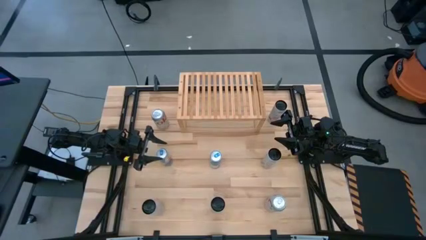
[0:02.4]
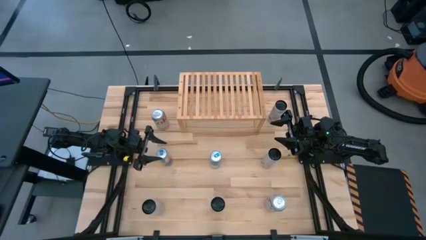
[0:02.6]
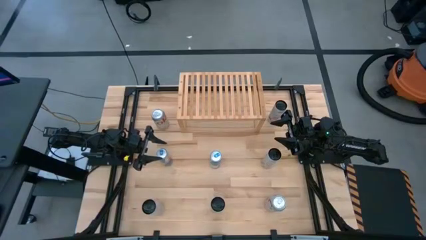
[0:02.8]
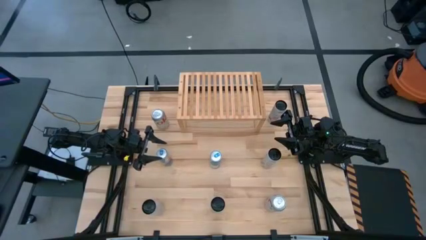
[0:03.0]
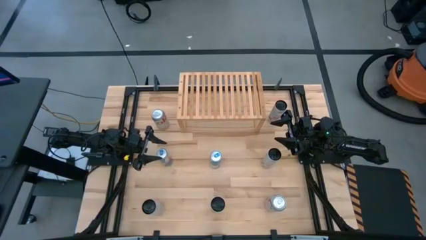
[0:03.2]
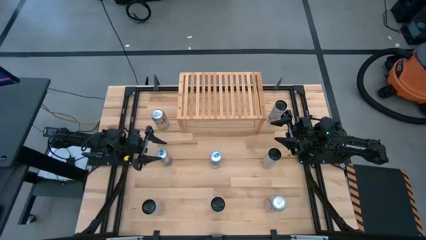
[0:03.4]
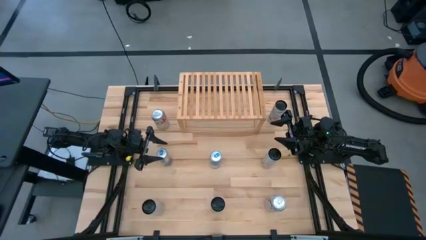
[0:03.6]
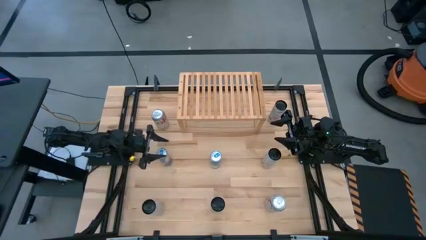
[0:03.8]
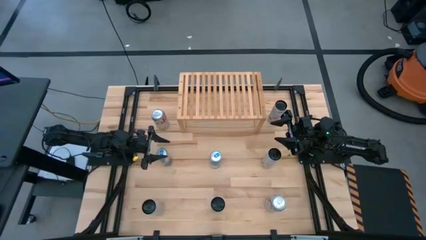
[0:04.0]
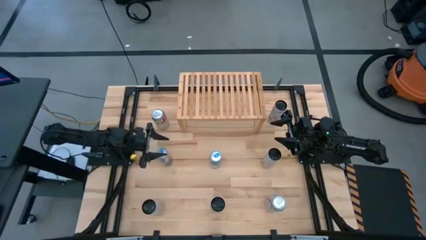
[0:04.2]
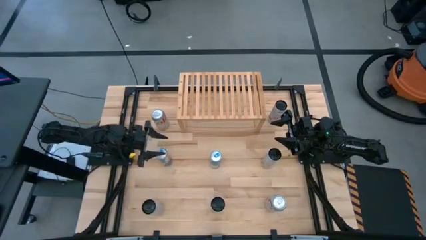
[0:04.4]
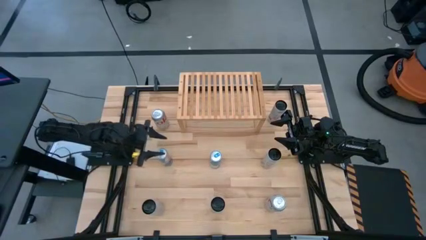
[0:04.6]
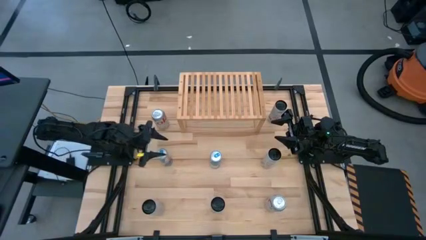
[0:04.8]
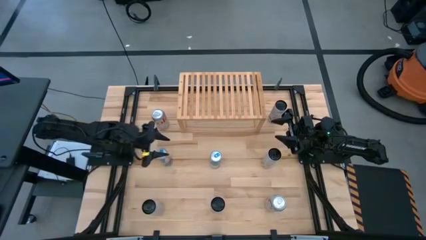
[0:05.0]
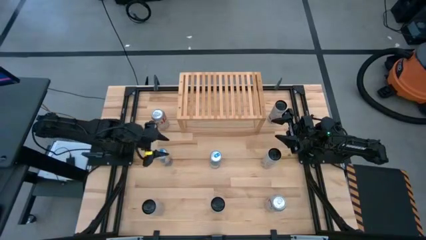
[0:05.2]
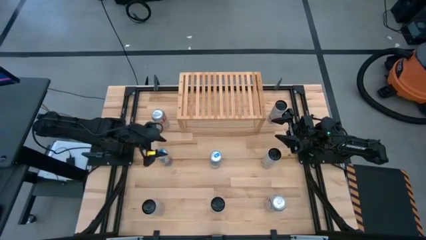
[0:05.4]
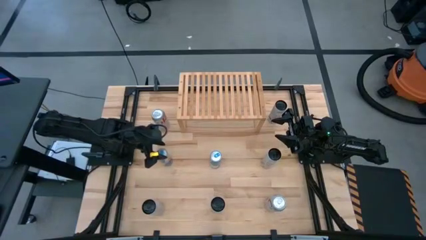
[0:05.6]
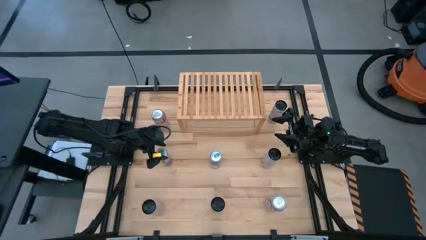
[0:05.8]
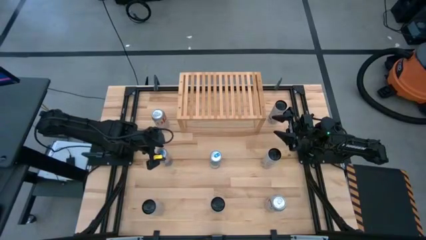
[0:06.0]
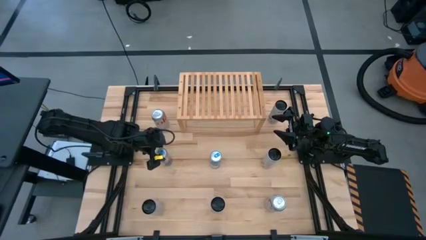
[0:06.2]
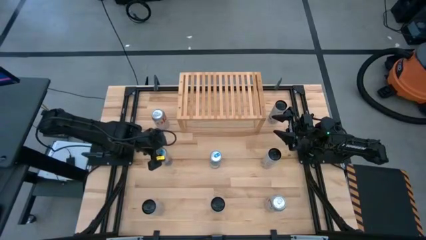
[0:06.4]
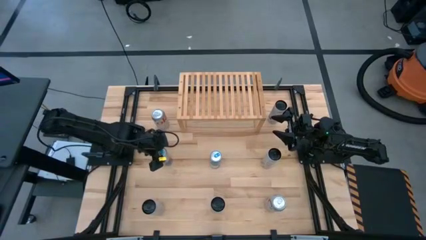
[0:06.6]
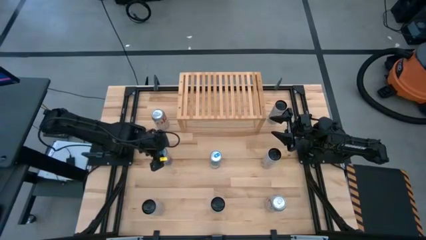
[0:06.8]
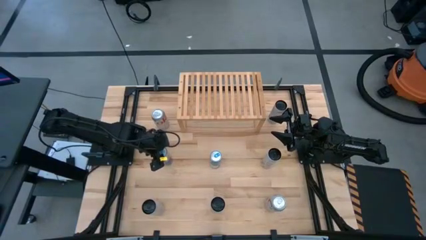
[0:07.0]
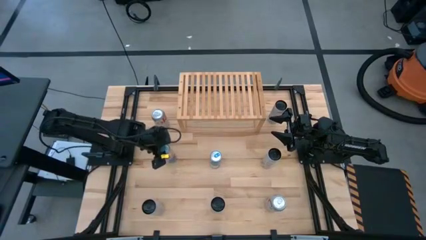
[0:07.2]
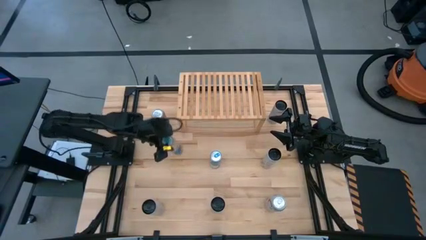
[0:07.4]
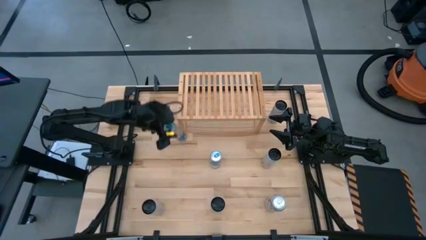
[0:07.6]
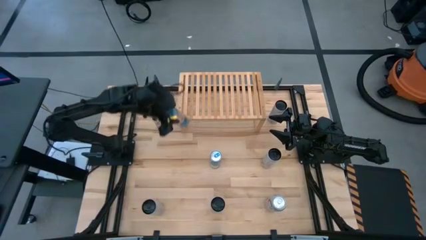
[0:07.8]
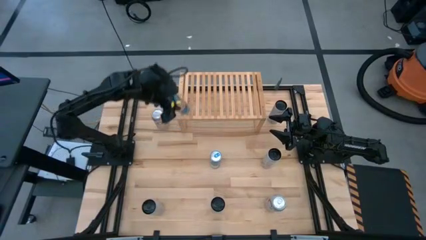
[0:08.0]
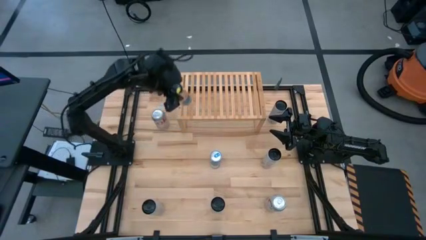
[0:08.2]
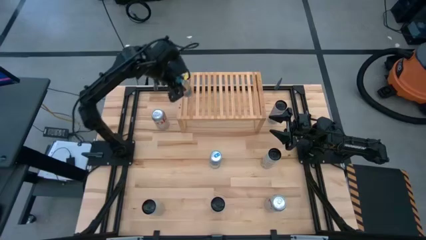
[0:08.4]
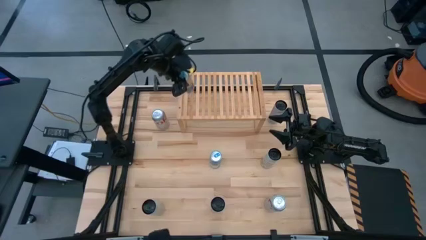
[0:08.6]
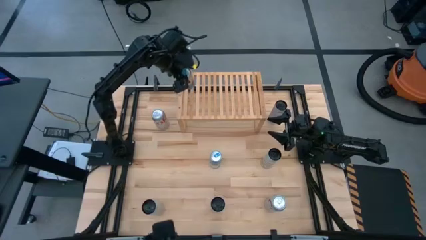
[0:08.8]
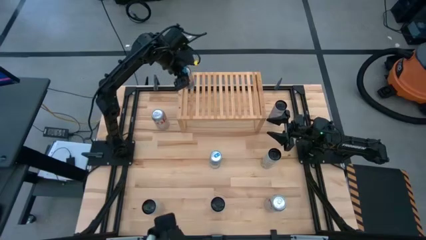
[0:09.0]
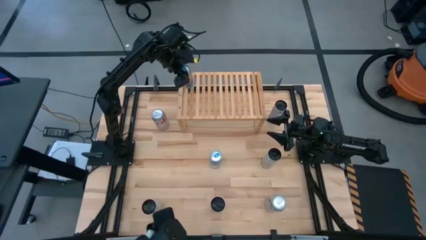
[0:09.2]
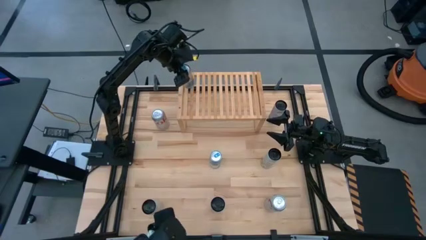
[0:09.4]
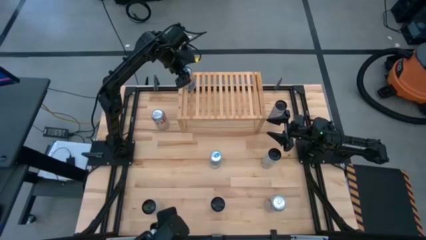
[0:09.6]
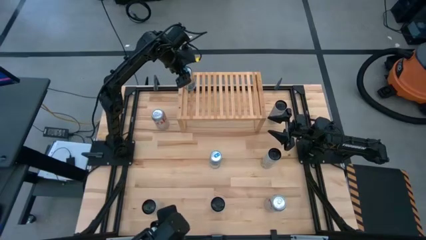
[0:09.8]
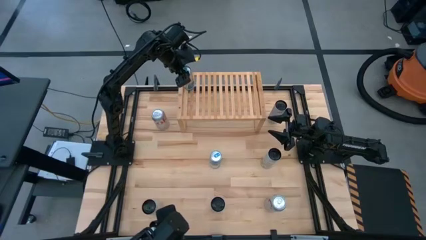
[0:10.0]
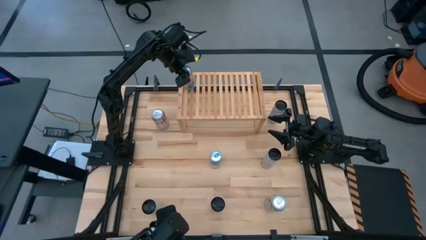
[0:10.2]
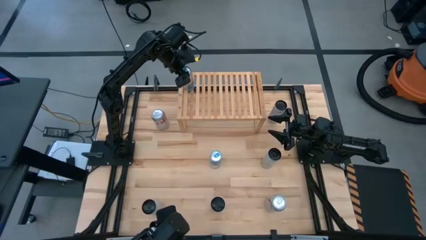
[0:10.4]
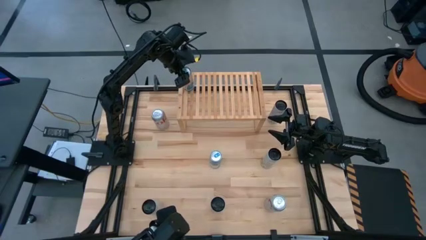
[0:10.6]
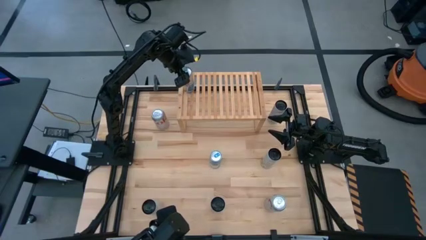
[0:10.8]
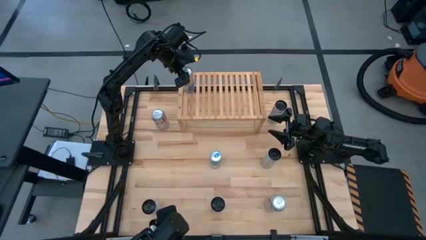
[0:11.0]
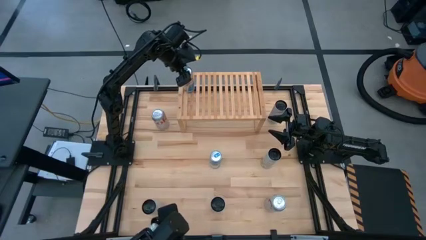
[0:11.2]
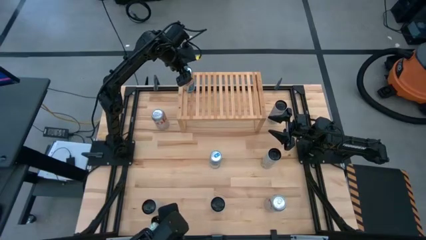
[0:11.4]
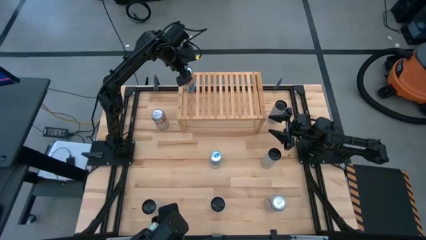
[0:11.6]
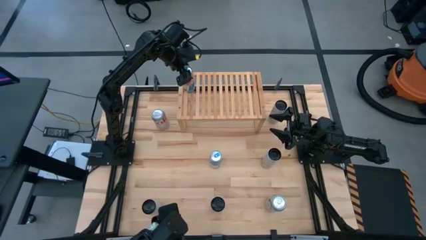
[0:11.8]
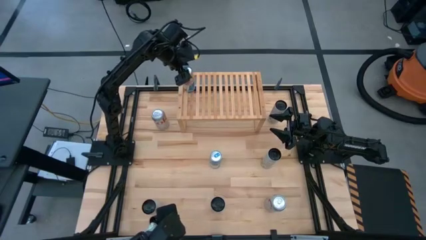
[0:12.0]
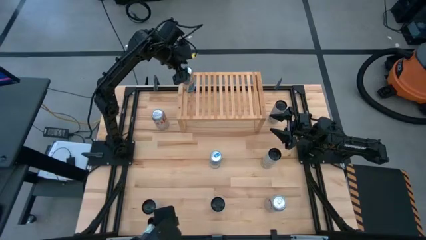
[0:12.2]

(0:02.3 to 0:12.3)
Task: Place canned beverage on shelf
Put the left blue soda can on the shelf

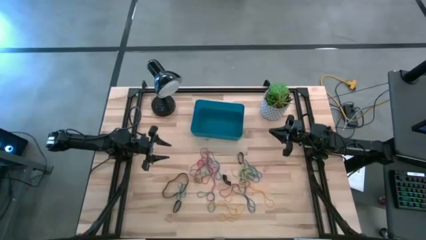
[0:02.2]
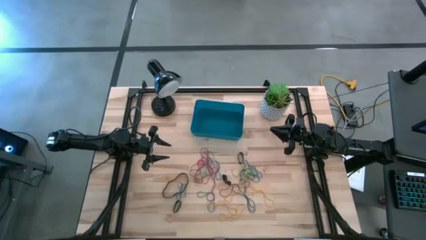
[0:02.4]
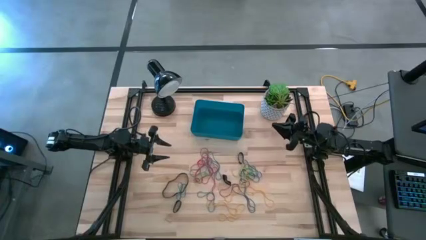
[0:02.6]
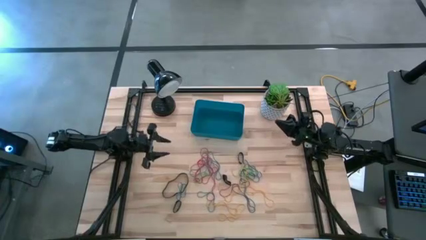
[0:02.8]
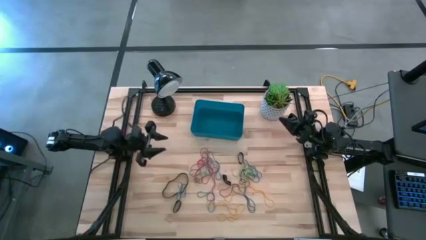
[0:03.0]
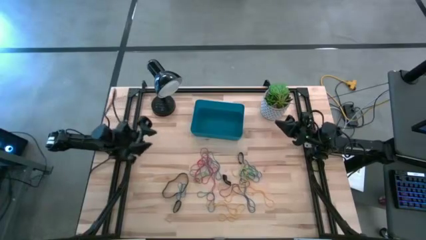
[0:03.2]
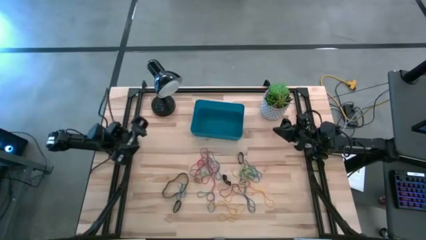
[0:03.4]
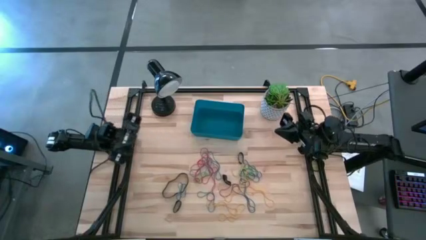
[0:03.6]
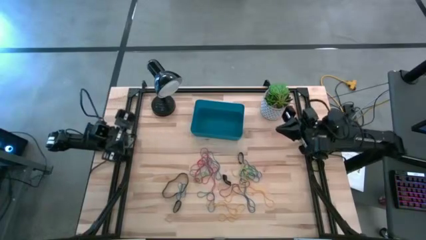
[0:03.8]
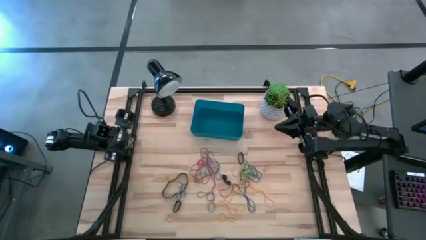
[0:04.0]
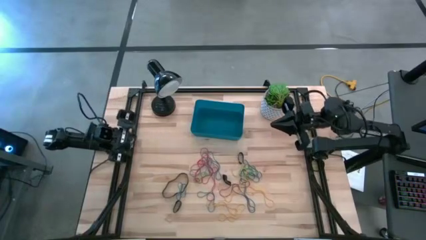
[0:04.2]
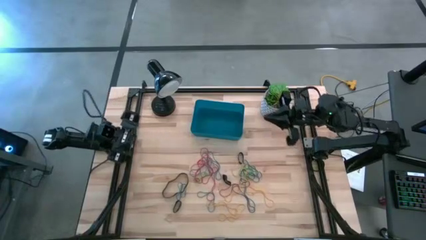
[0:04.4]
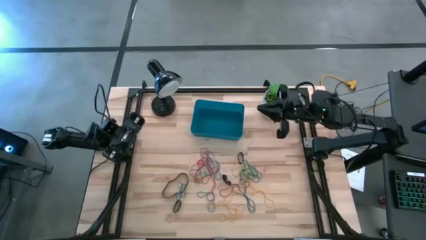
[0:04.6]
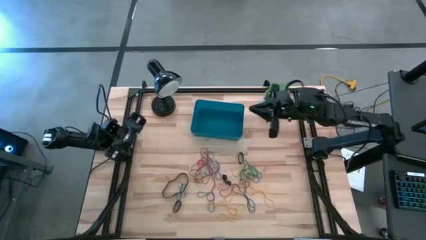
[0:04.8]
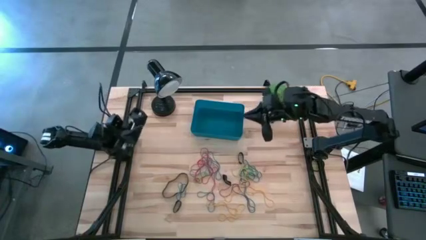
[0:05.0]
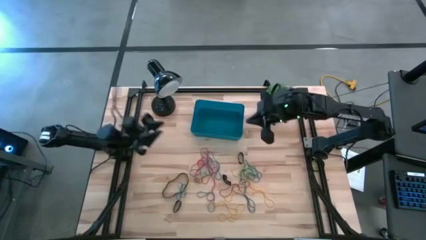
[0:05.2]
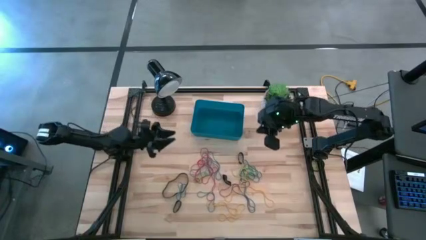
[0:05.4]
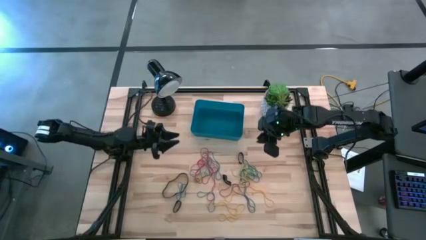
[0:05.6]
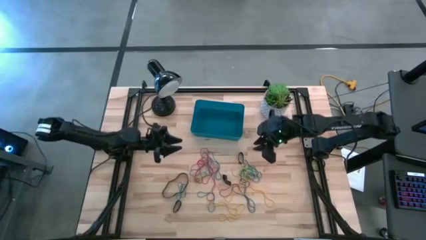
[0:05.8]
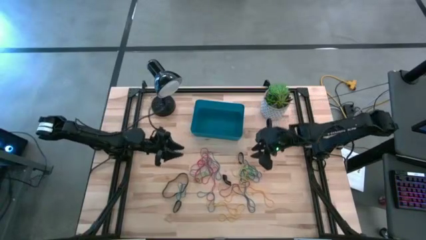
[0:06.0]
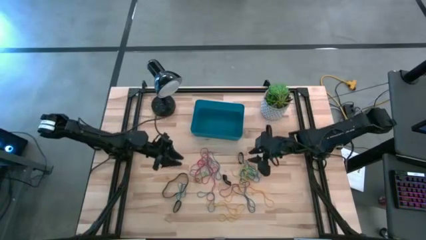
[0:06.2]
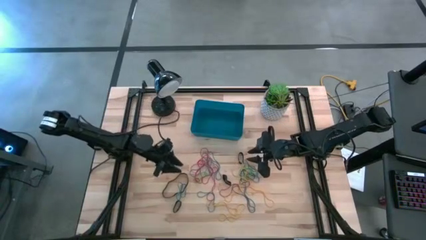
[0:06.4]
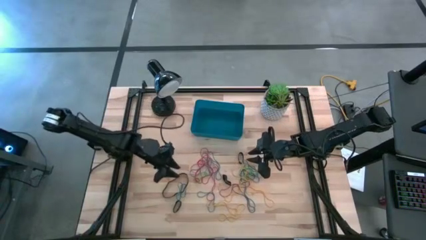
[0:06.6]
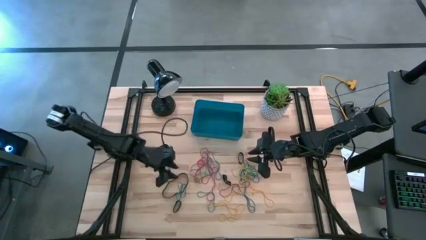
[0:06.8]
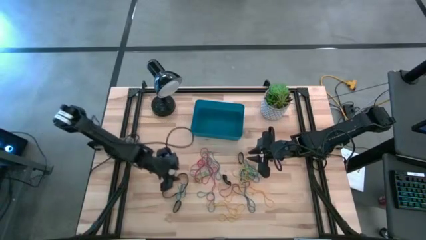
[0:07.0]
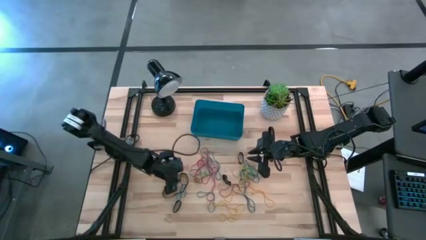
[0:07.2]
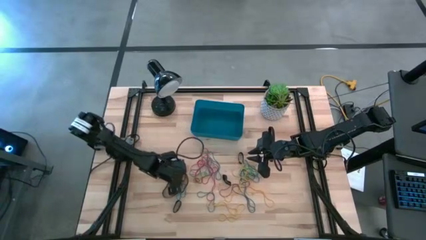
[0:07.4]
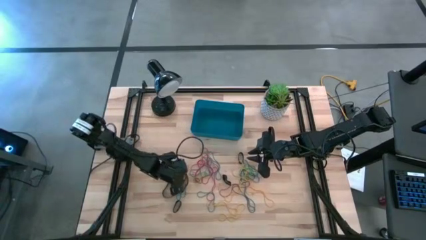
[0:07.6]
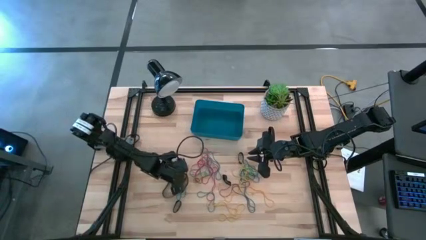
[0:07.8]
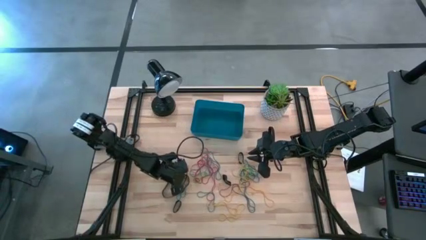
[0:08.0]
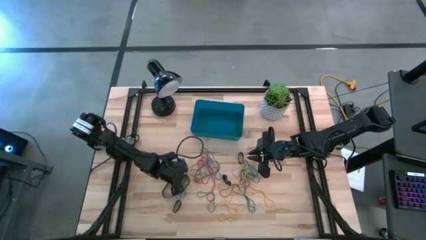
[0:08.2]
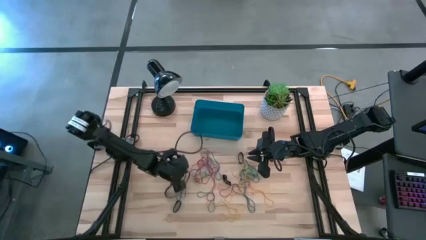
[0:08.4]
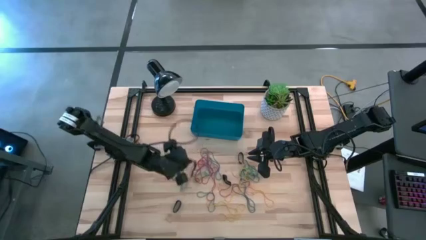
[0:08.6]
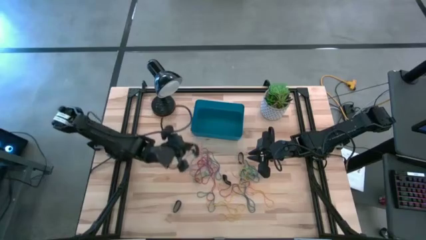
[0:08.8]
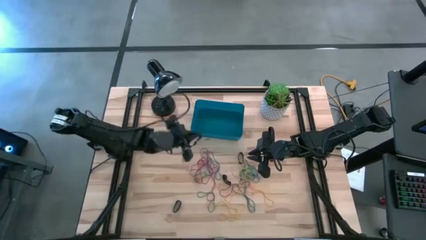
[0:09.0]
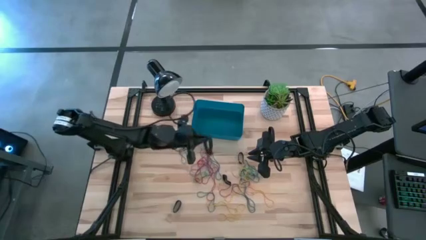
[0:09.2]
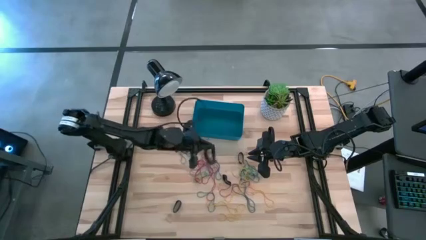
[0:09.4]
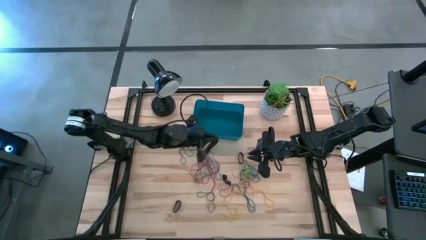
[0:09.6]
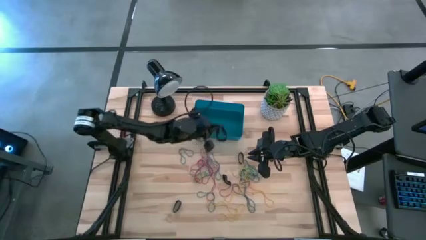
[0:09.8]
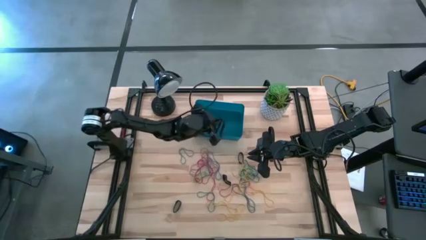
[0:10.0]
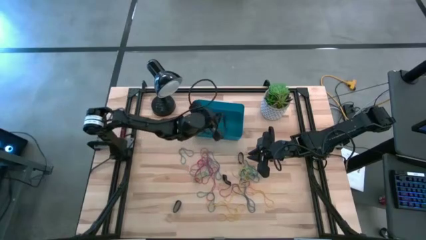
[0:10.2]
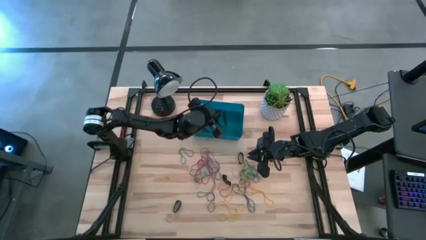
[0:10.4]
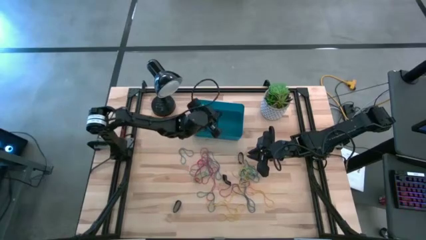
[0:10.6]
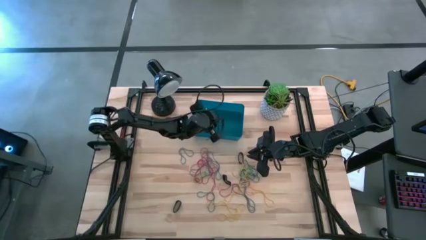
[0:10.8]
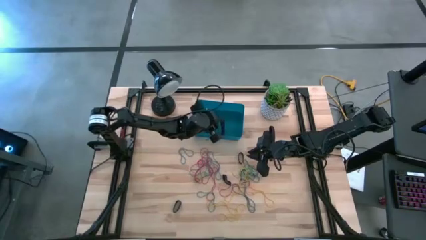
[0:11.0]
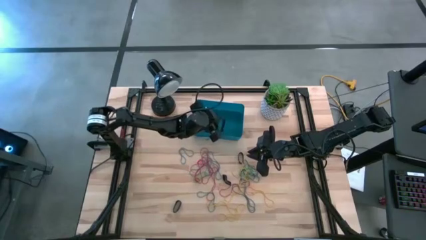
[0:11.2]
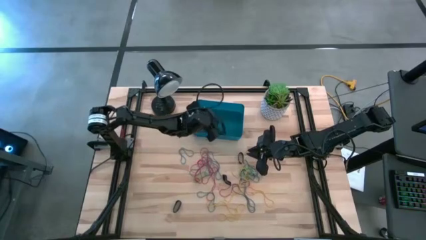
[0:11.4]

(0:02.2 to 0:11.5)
Task: Pick and place rubber bands into bin
Put the black rubber band into the blue bin
